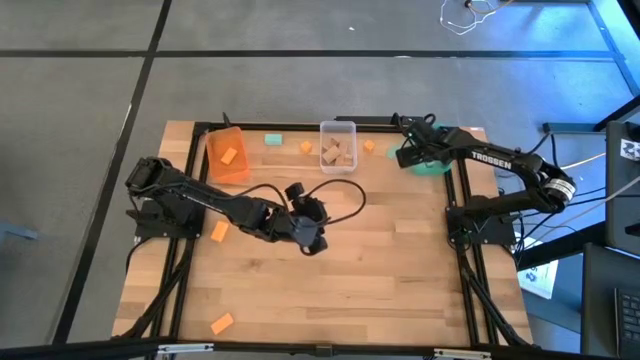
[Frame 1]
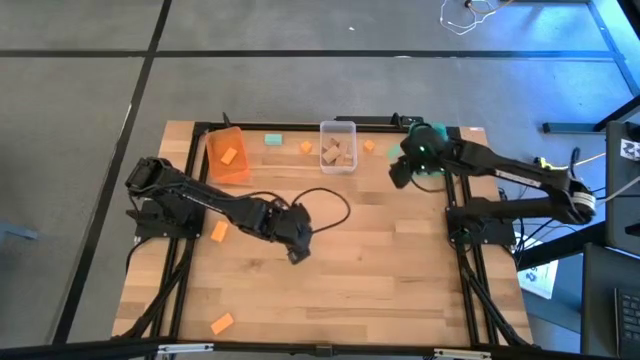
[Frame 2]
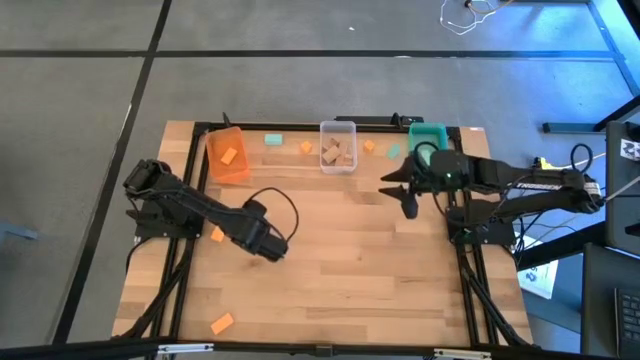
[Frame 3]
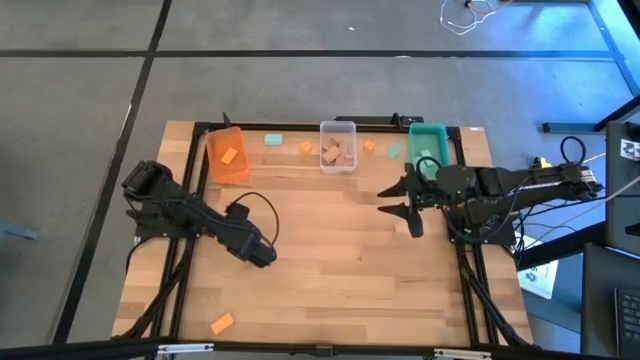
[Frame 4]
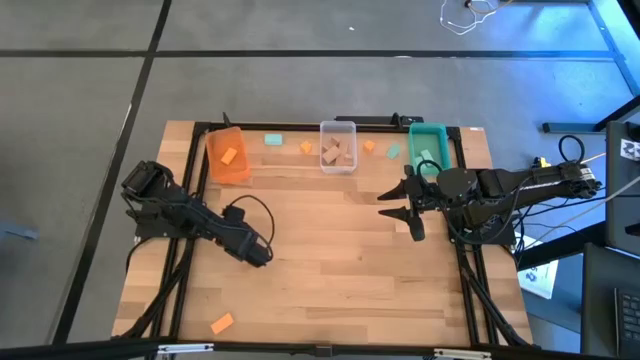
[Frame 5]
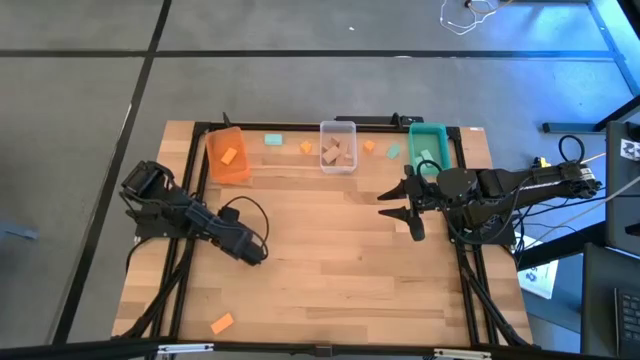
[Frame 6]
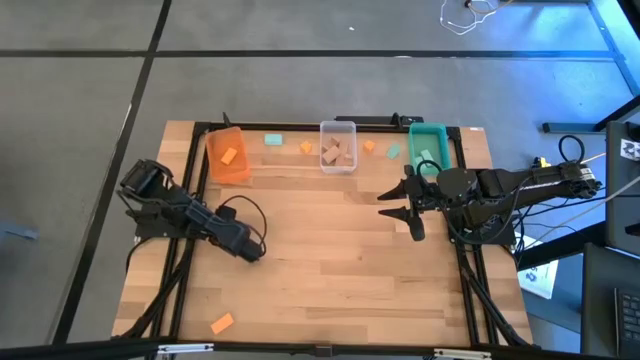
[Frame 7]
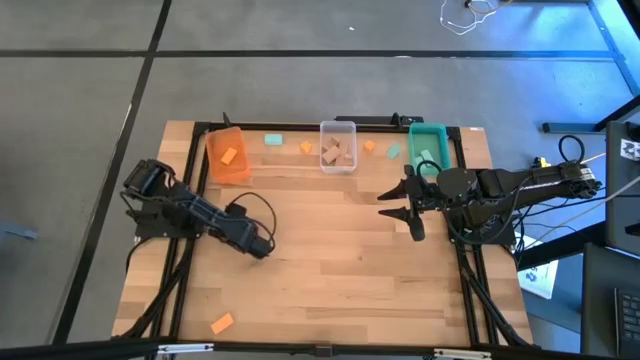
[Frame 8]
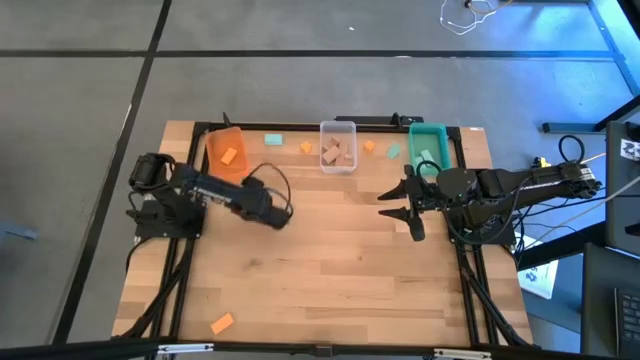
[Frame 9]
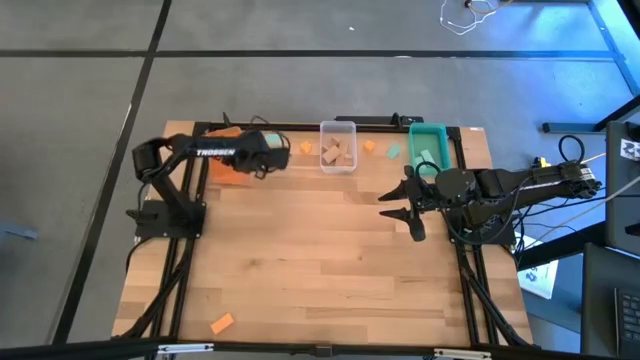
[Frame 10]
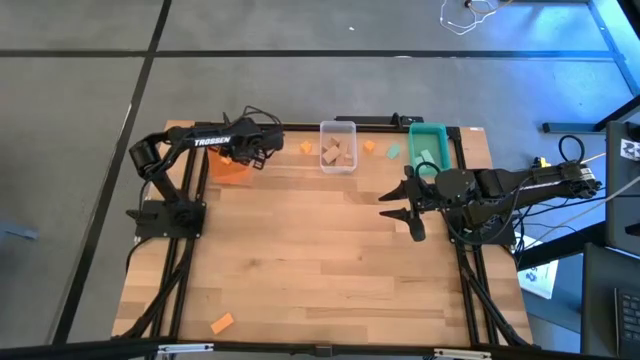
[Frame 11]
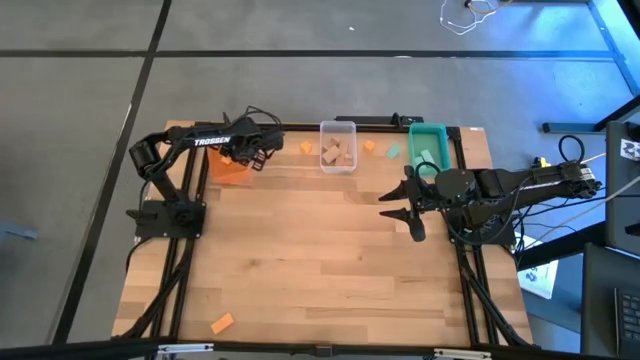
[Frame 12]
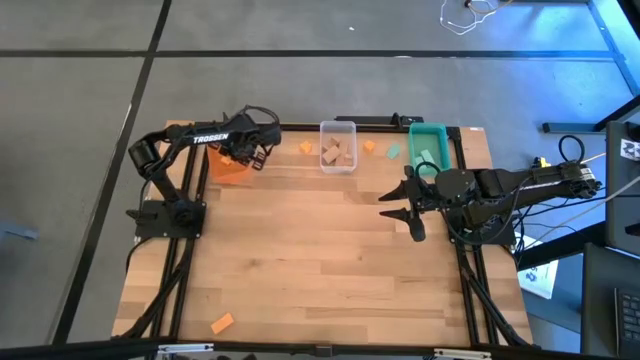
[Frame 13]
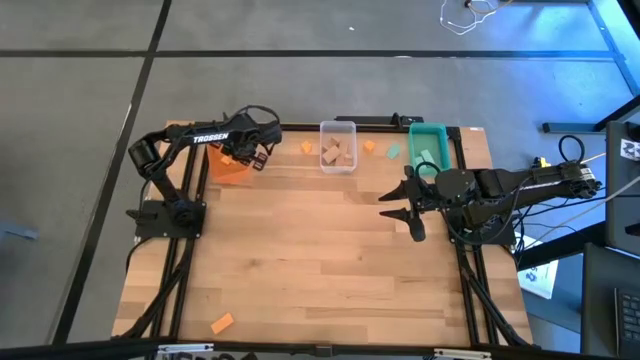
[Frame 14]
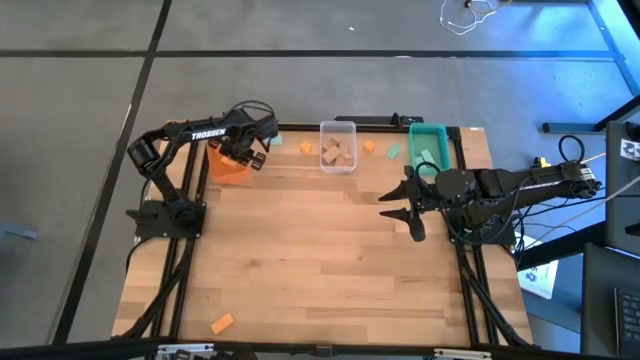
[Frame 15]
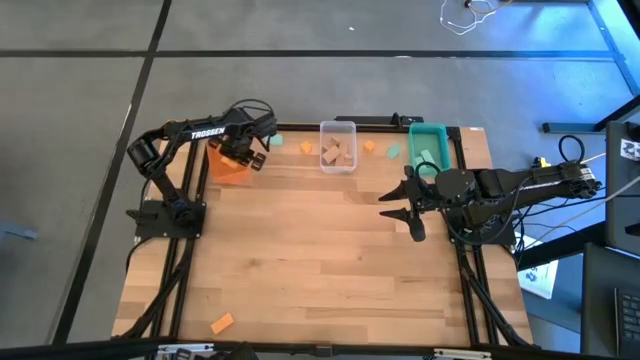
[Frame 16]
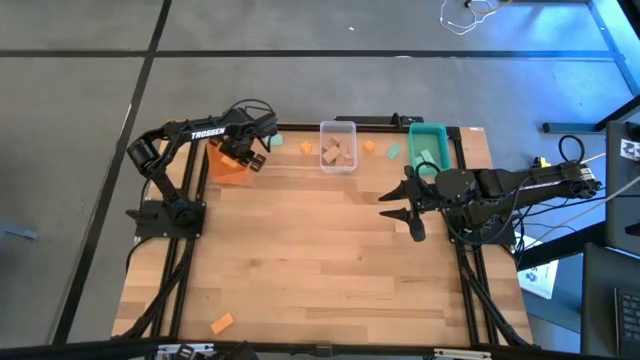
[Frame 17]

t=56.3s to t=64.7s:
Task: Sort & place blocks by color
Put the orange block into the orange bin

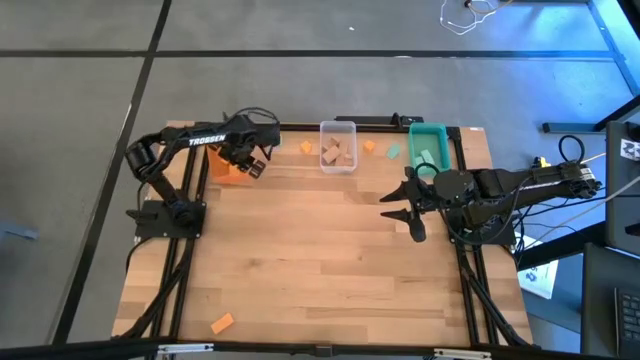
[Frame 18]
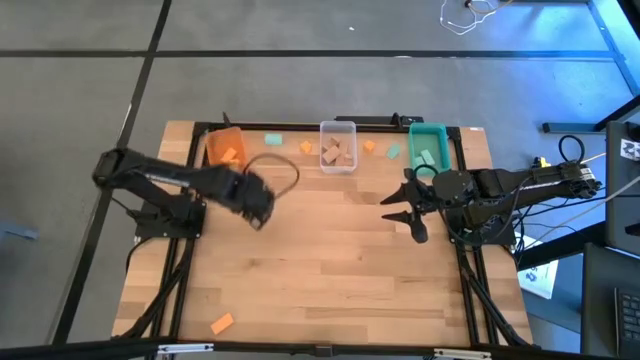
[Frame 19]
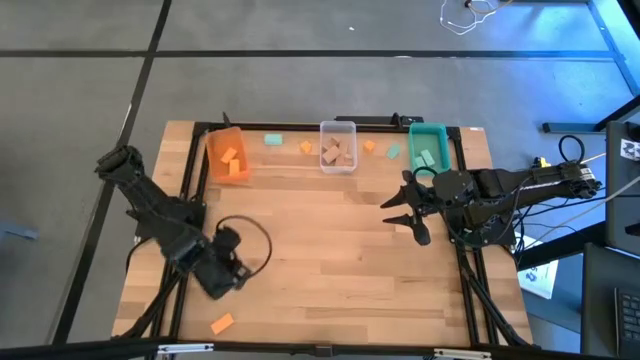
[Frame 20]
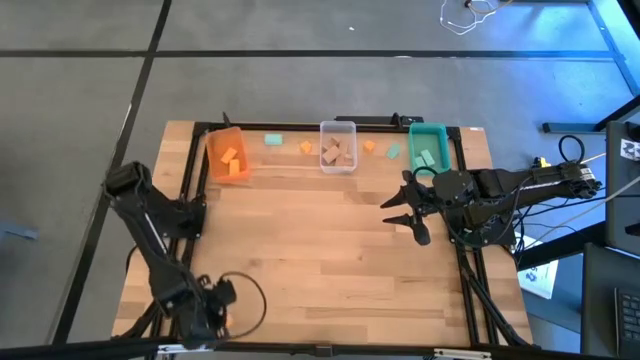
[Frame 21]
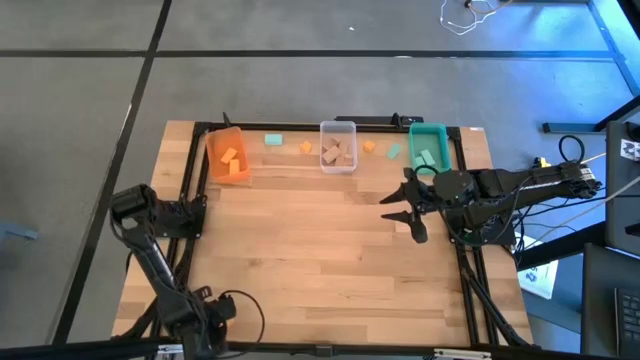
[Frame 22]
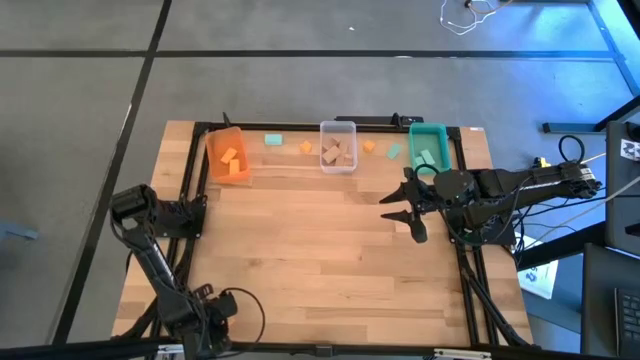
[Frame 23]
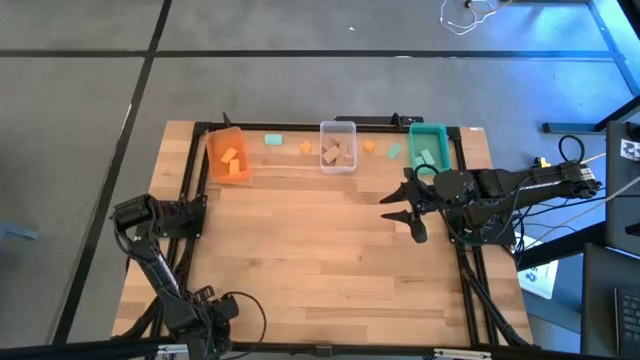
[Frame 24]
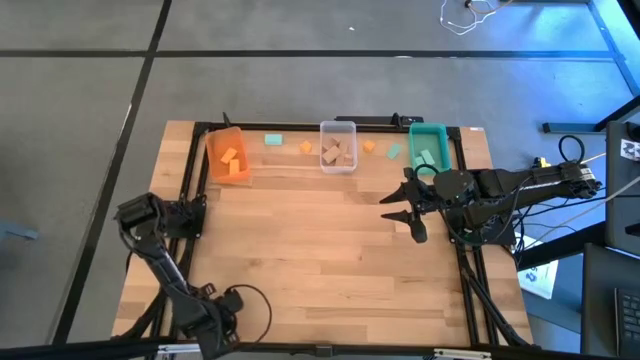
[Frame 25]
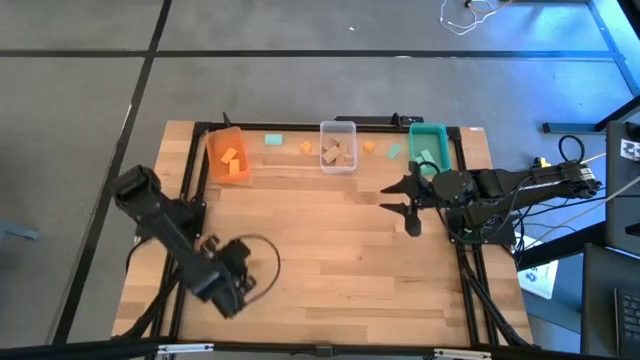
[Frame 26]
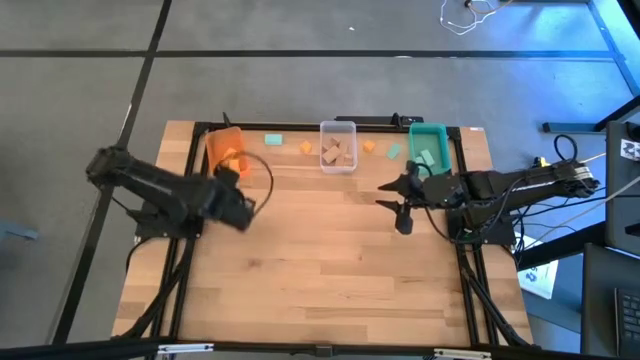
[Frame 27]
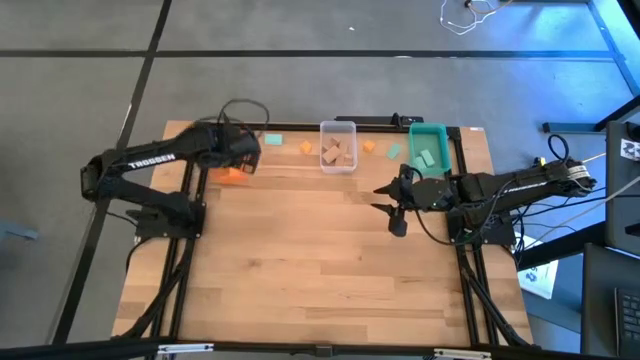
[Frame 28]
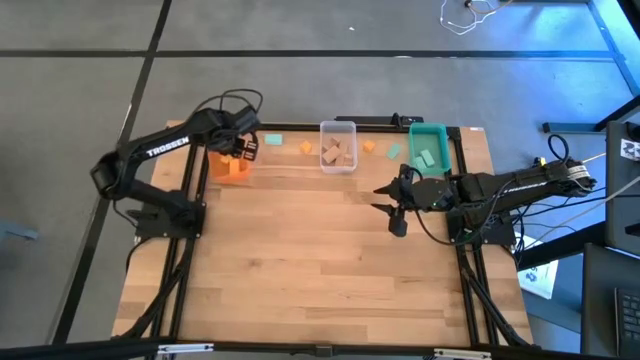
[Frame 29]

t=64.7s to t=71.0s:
Put the orange block into the orange bin

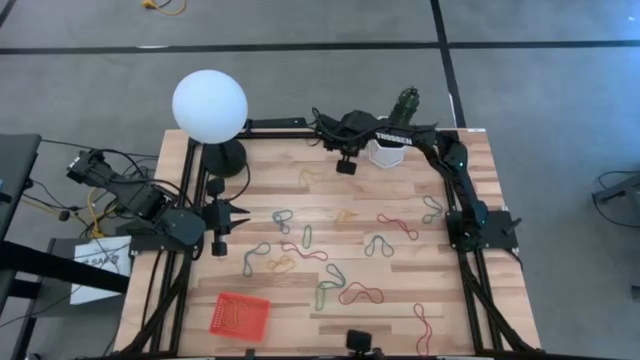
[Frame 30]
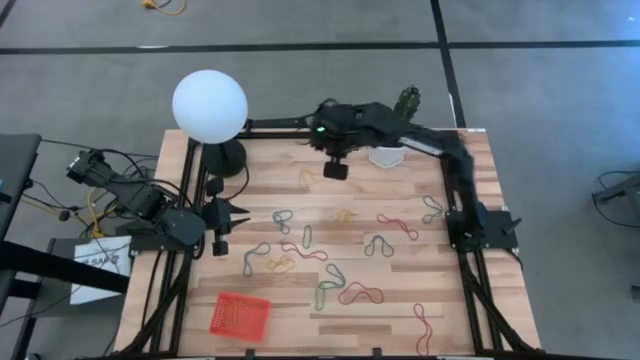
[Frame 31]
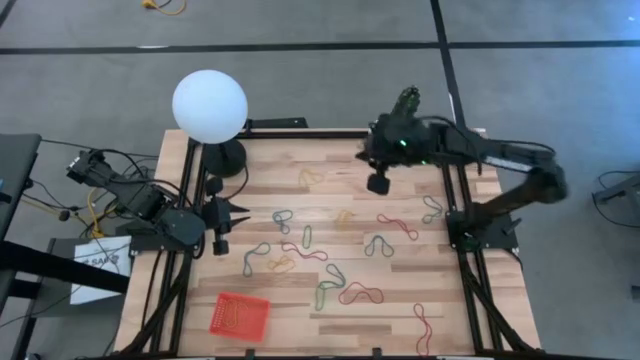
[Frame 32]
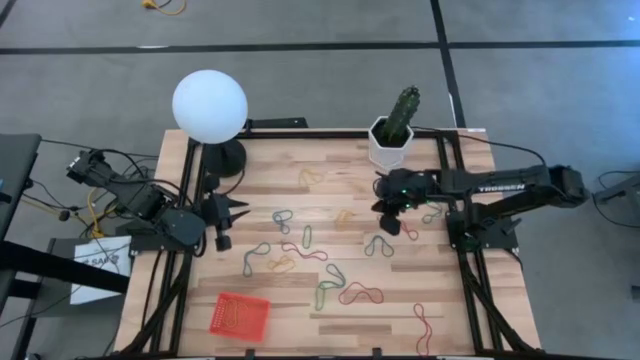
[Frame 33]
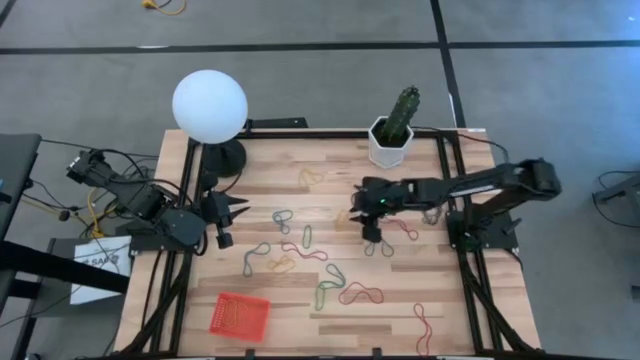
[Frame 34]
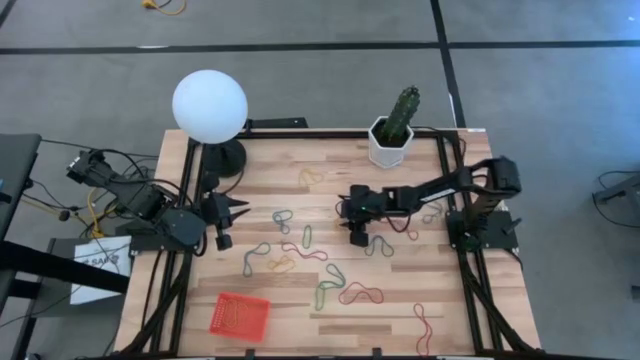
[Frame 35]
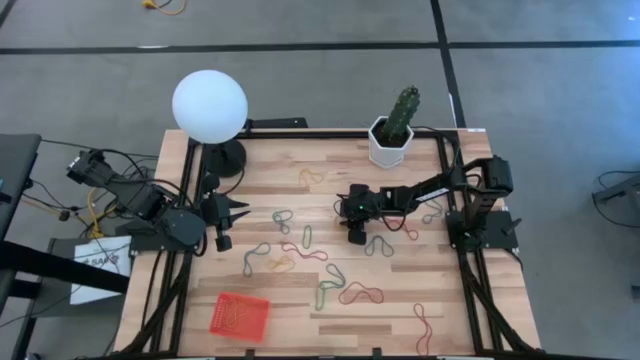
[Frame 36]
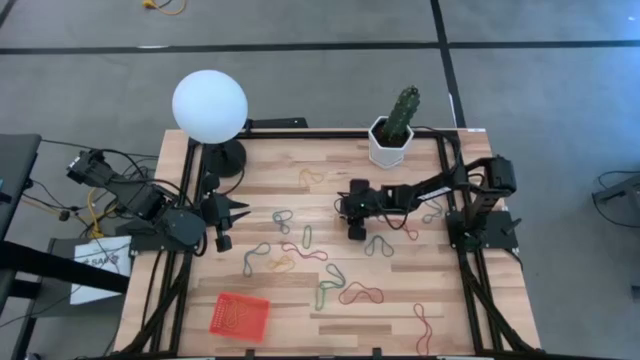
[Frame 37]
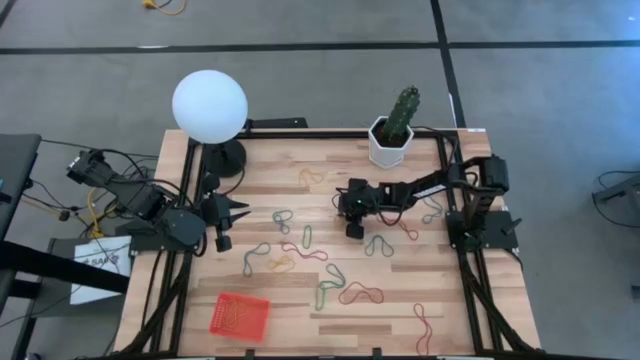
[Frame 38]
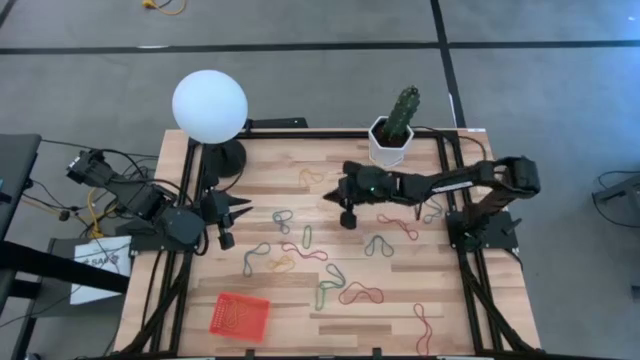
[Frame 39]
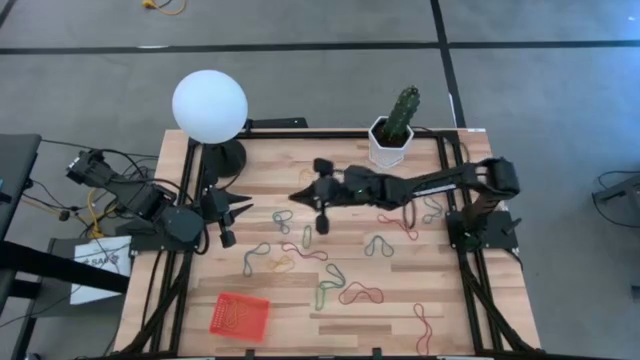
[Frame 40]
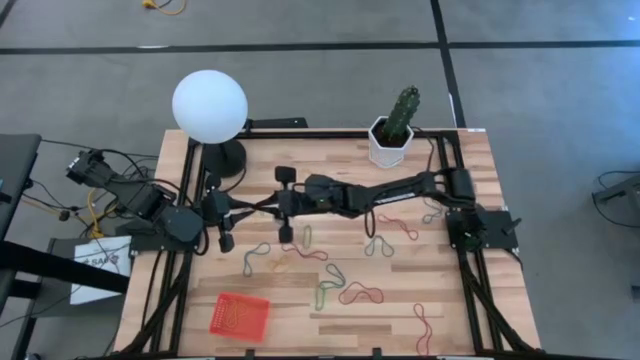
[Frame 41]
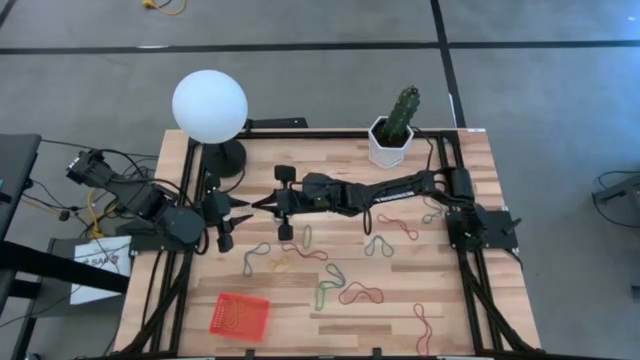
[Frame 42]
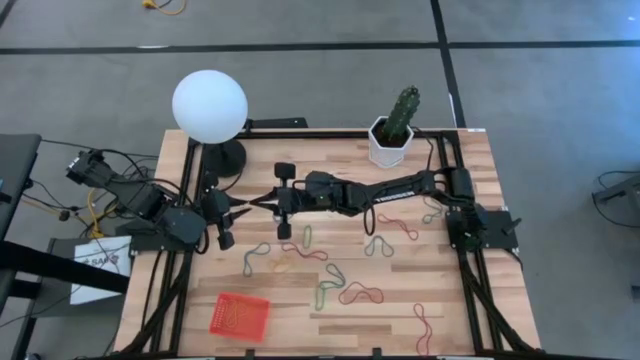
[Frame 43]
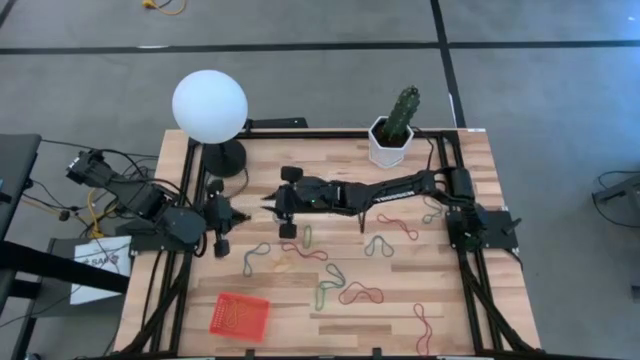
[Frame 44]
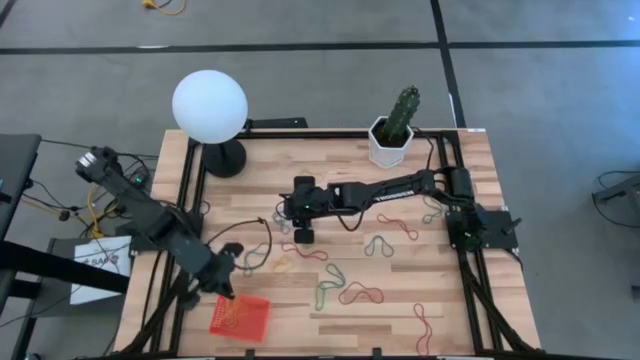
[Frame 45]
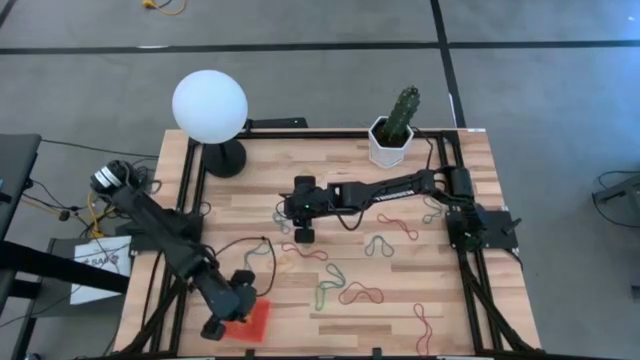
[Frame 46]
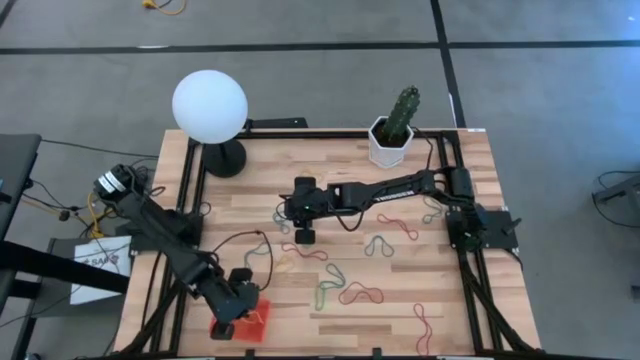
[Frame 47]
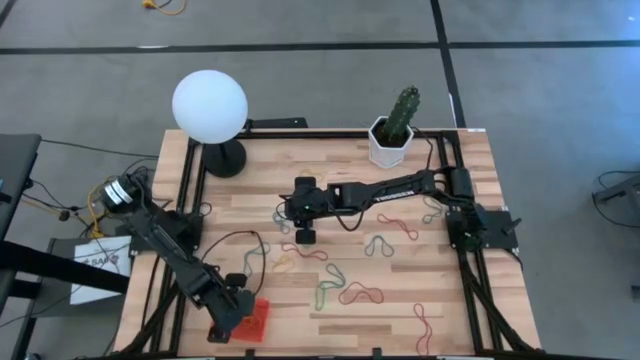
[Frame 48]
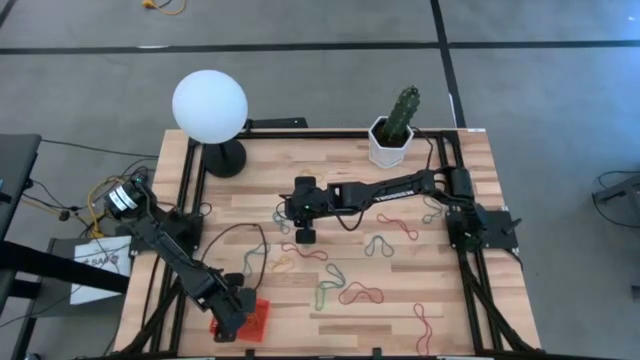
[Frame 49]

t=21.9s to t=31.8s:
Task: Pick and place rubber bands into bin
Put the middle yellow rubber band into the basket
